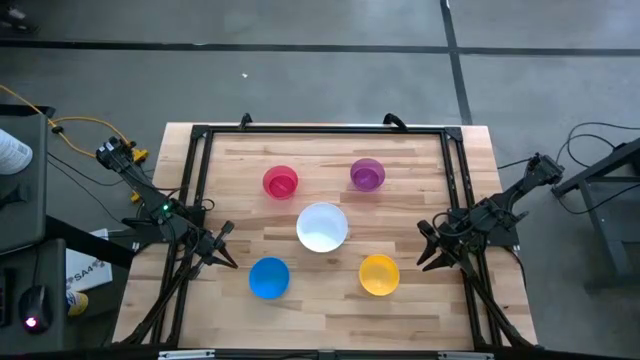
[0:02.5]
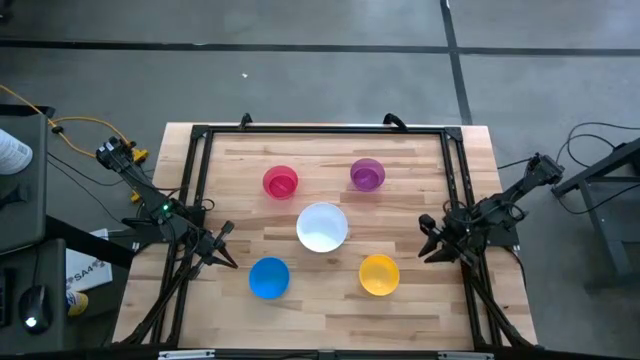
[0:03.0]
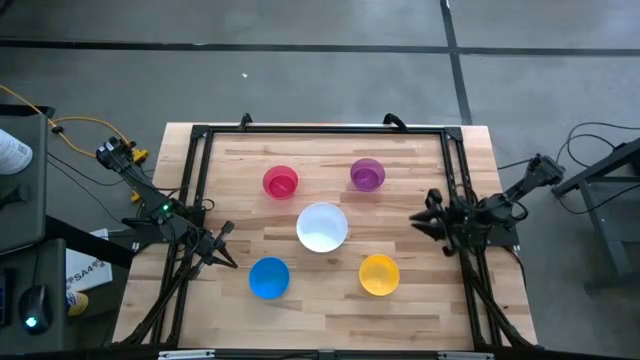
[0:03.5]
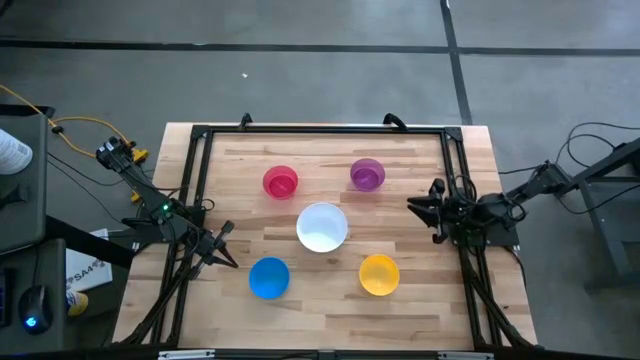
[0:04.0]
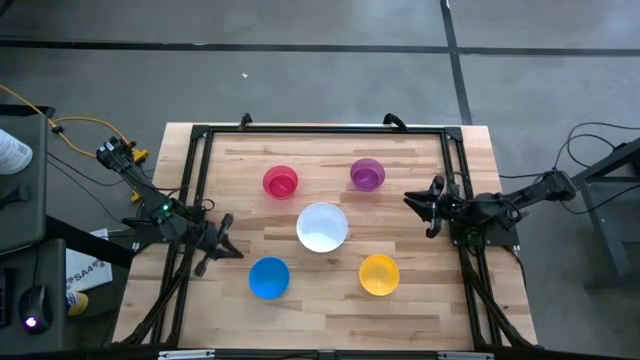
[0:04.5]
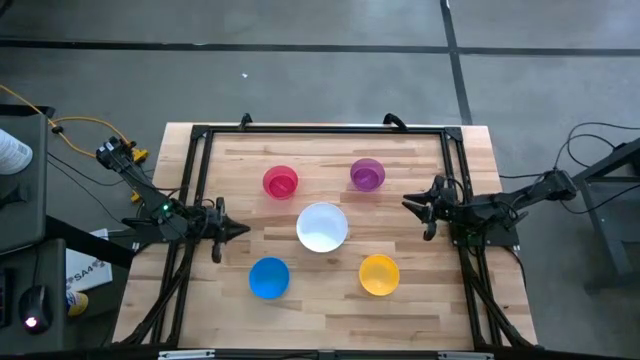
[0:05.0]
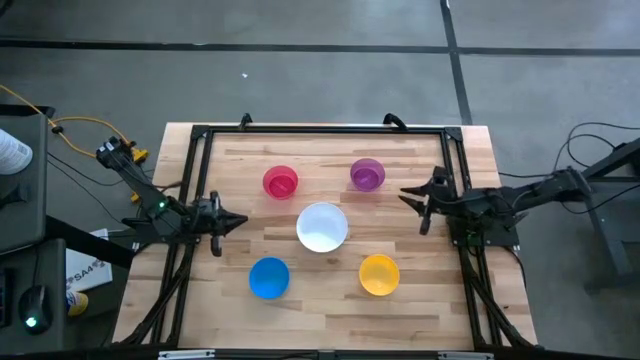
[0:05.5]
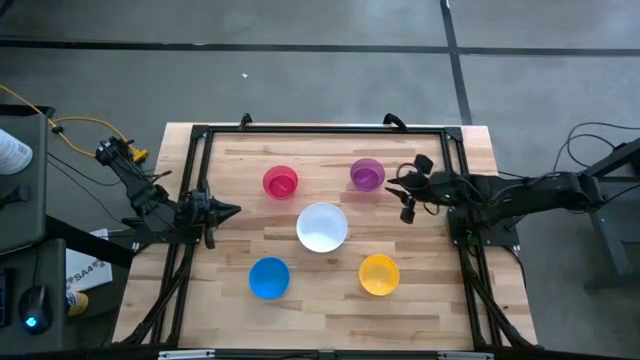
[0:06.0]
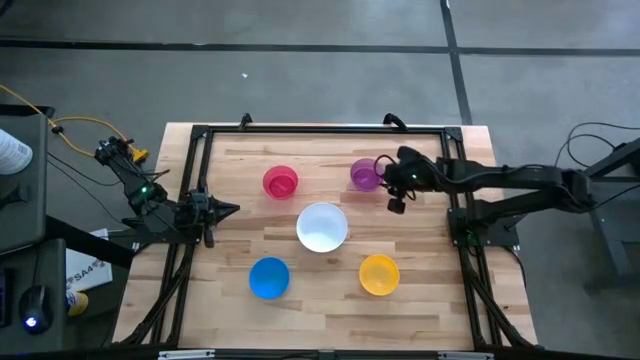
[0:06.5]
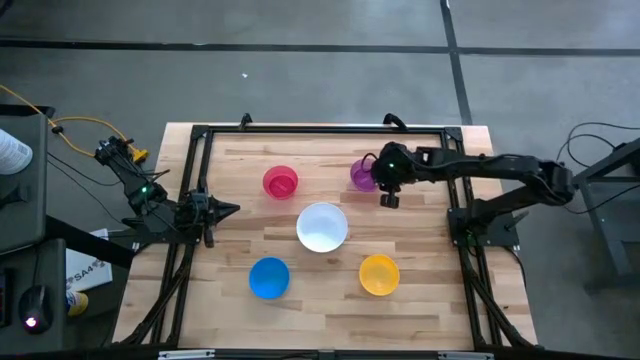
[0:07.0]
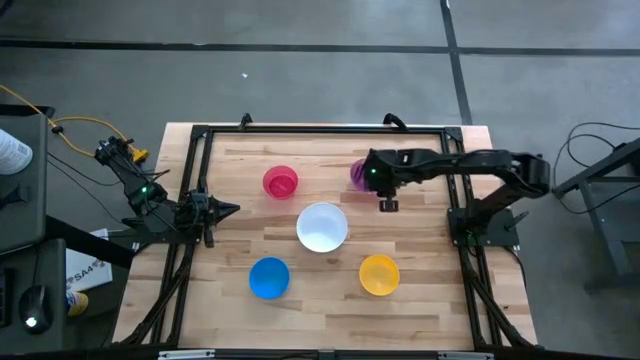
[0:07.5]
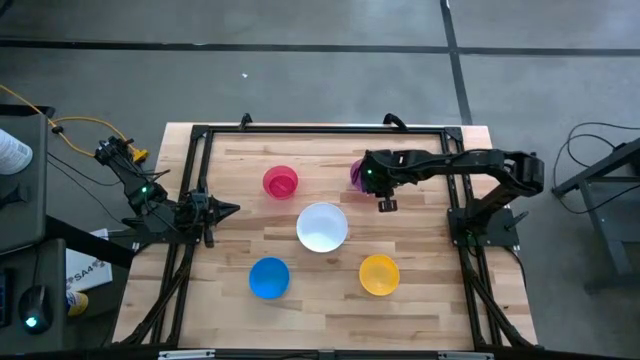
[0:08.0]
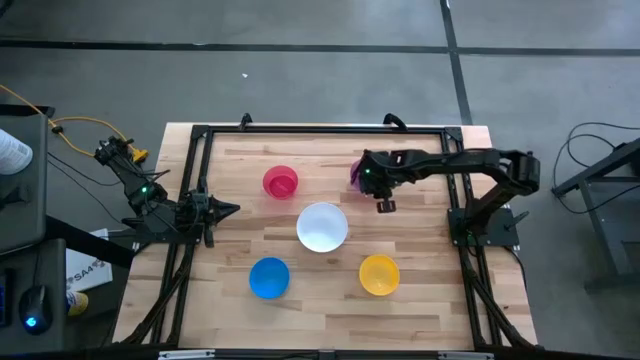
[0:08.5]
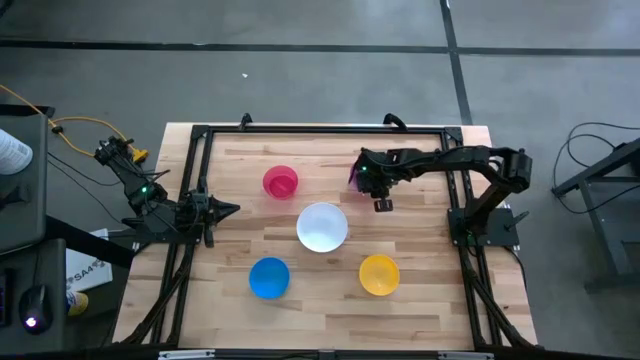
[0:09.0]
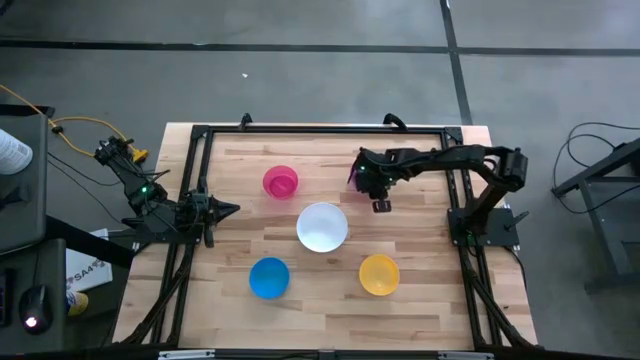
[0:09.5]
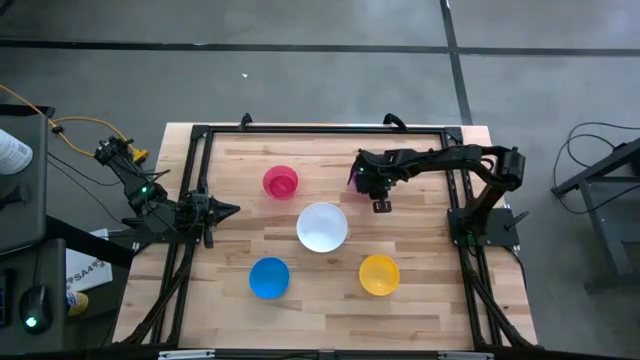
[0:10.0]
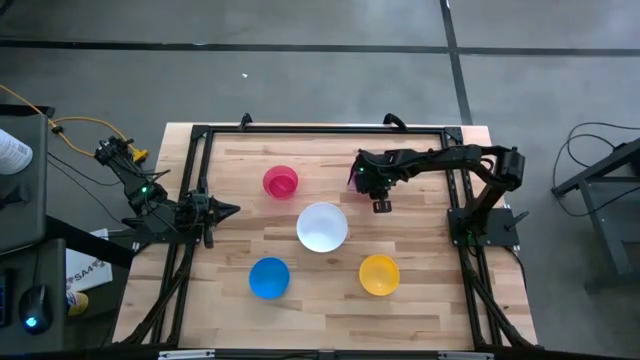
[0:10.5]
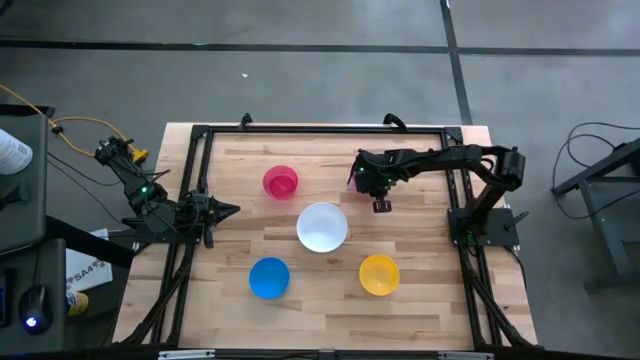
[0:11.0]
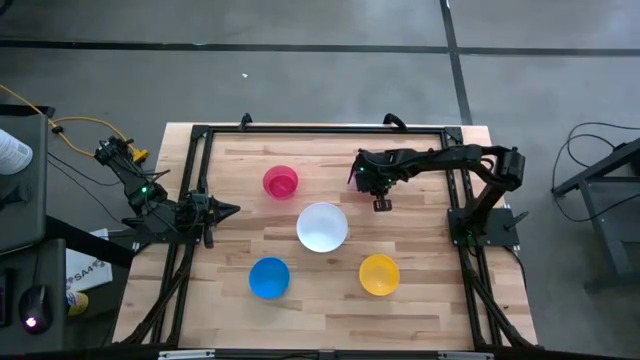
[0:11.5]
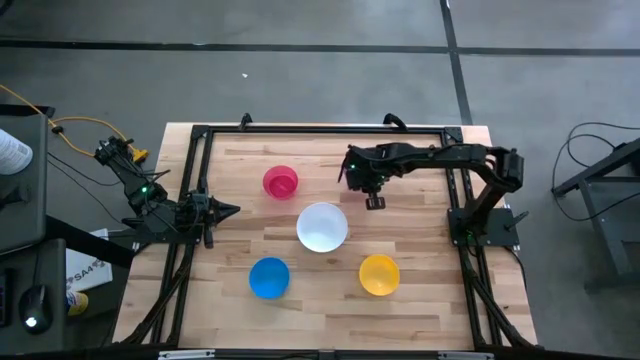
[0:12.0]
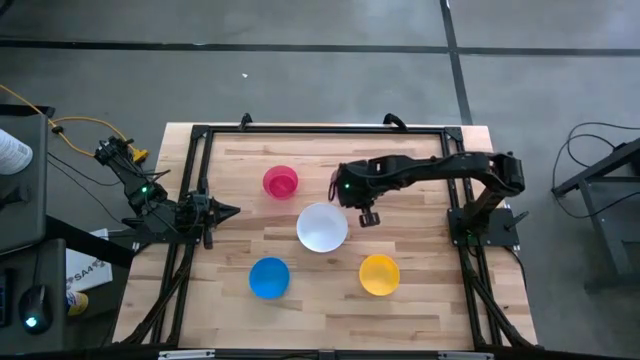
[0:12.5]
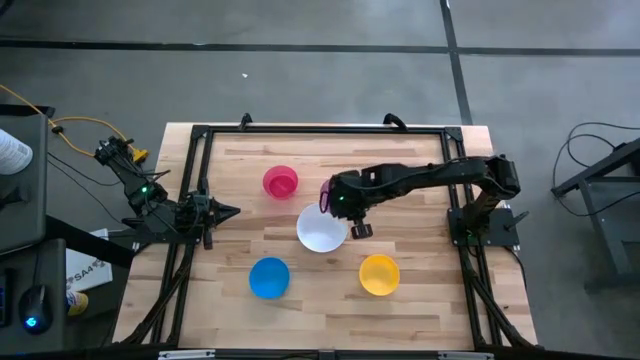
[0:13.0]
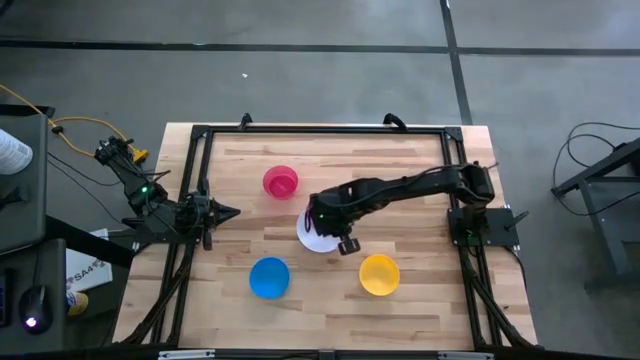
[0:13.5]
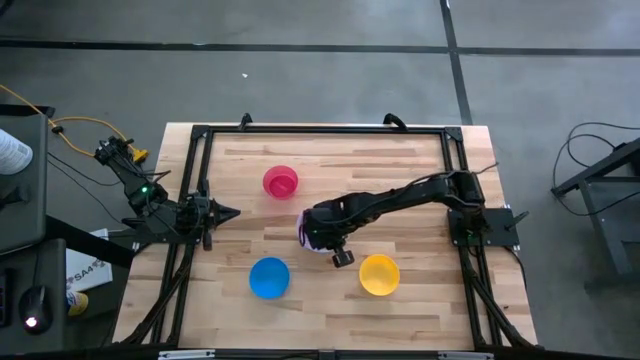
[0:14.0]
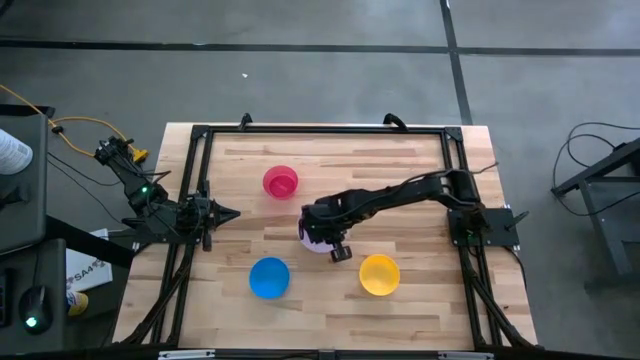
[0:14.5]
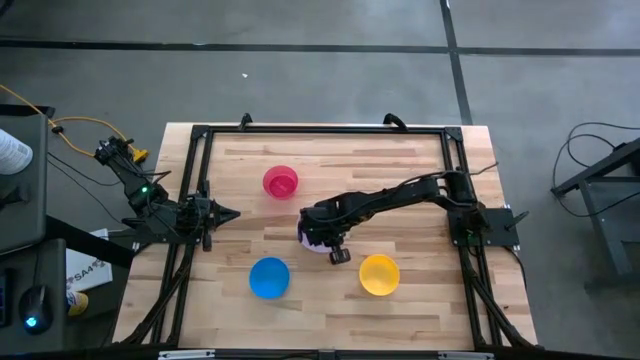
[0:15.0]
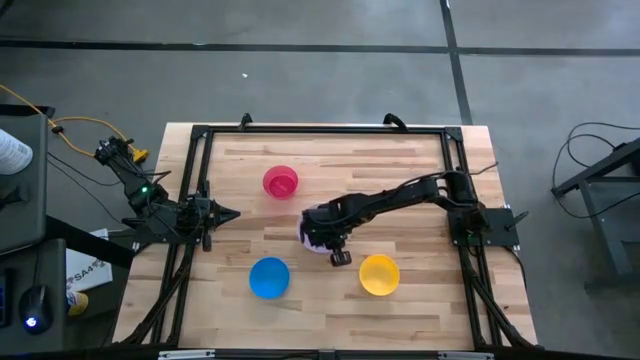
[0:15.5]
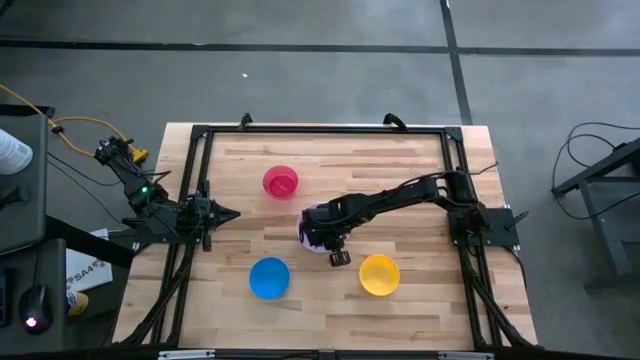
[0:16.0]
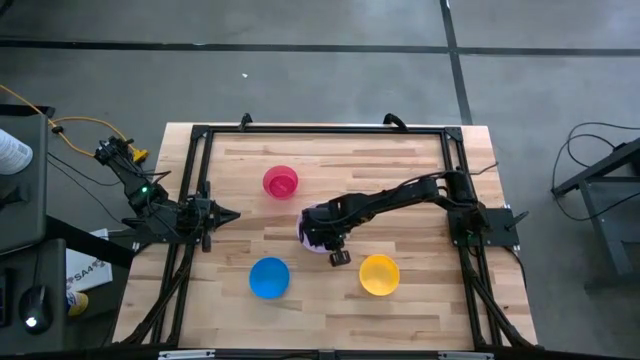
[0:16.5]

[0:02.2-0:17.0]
Stack the violet bowl on the white bowl
